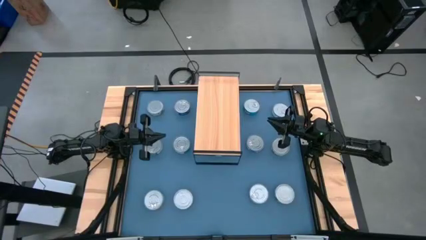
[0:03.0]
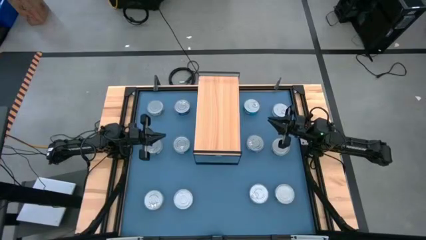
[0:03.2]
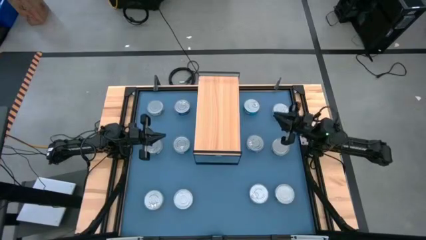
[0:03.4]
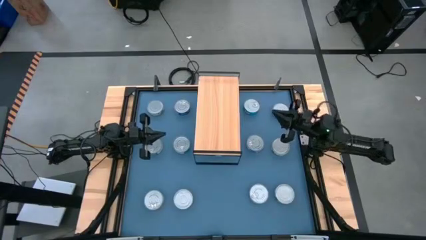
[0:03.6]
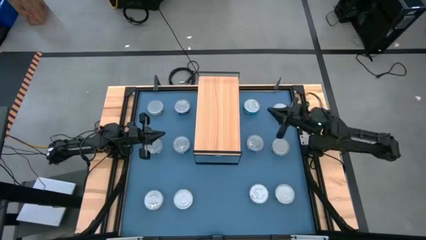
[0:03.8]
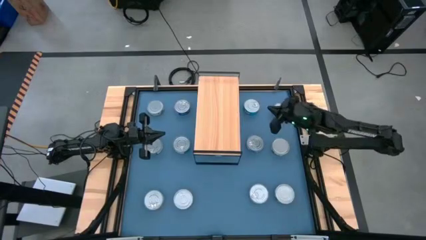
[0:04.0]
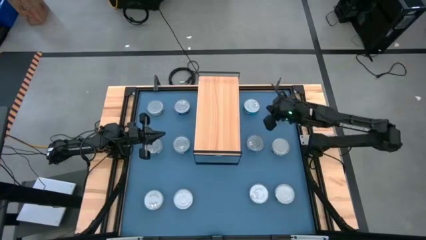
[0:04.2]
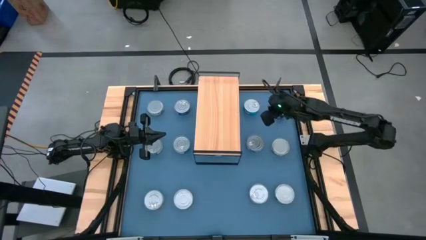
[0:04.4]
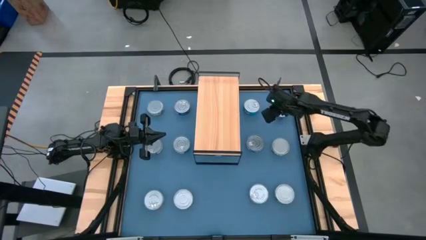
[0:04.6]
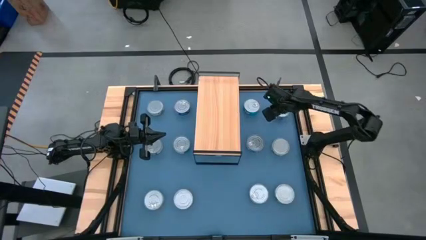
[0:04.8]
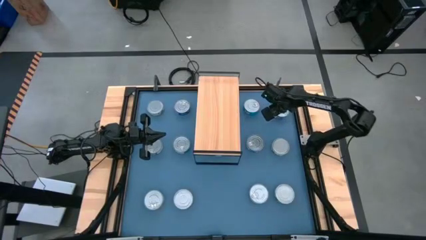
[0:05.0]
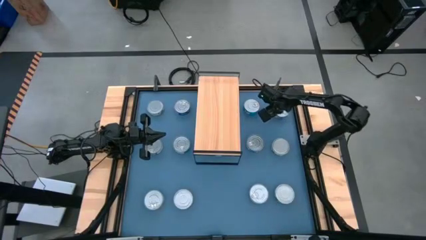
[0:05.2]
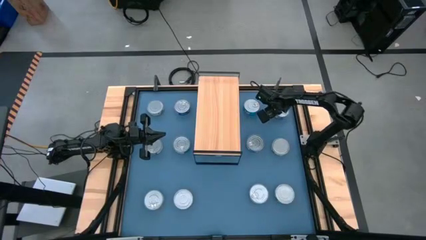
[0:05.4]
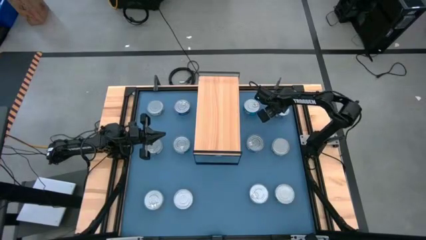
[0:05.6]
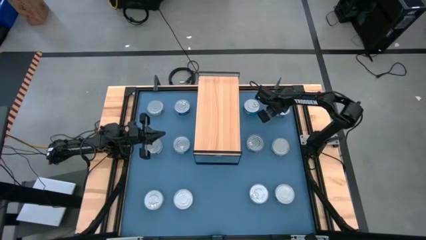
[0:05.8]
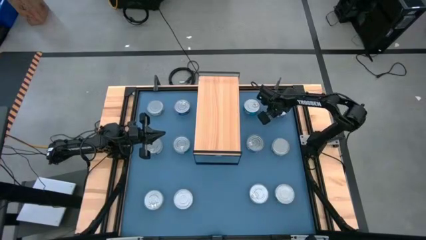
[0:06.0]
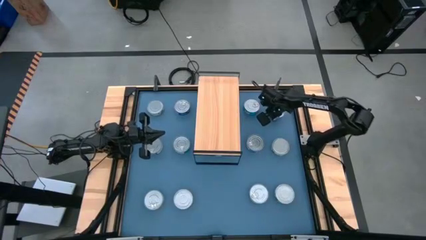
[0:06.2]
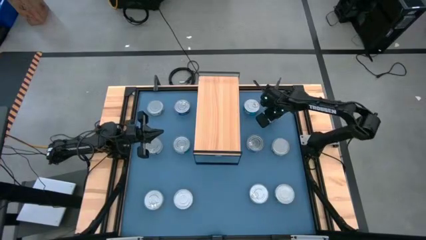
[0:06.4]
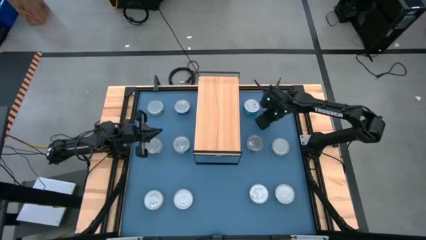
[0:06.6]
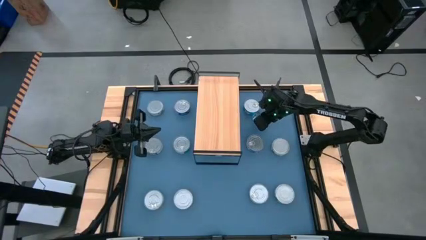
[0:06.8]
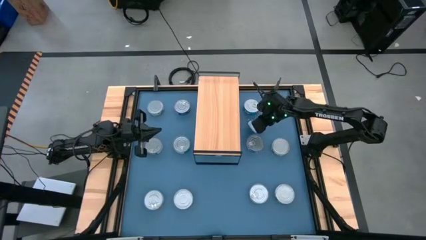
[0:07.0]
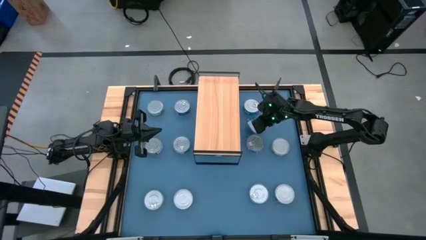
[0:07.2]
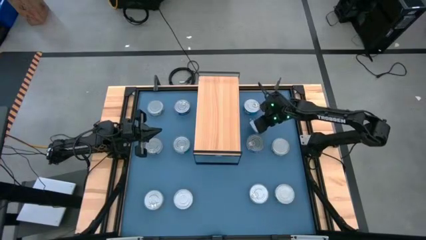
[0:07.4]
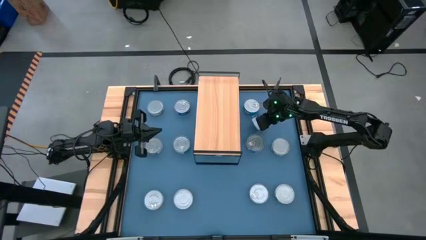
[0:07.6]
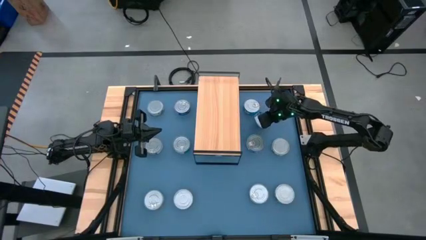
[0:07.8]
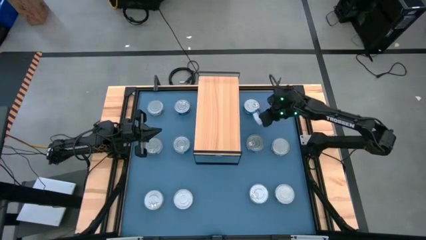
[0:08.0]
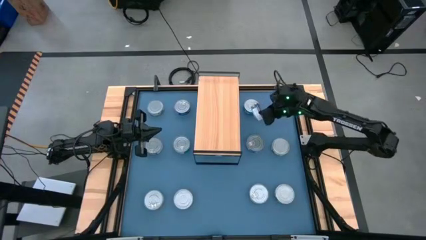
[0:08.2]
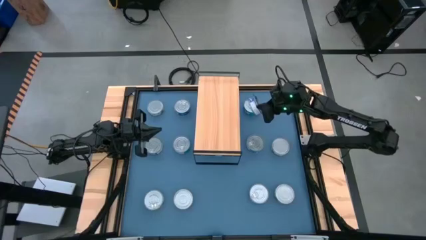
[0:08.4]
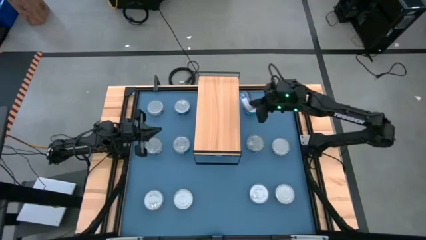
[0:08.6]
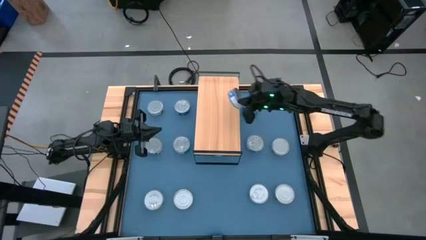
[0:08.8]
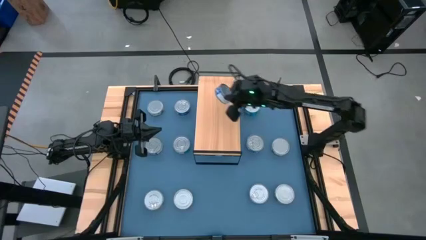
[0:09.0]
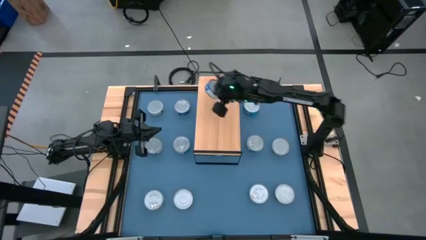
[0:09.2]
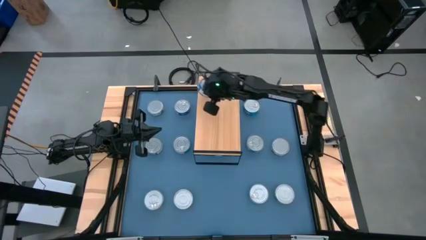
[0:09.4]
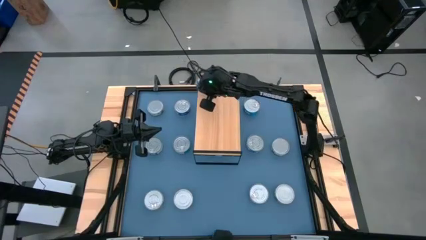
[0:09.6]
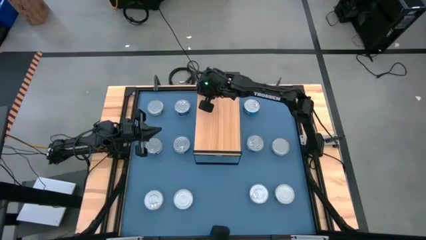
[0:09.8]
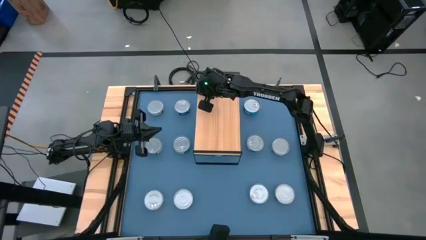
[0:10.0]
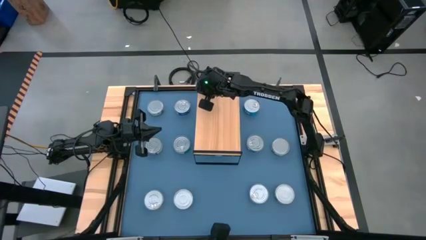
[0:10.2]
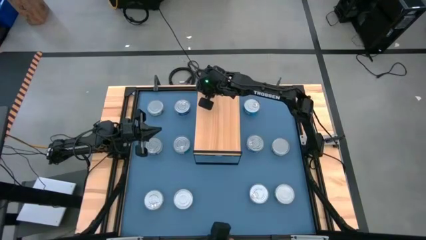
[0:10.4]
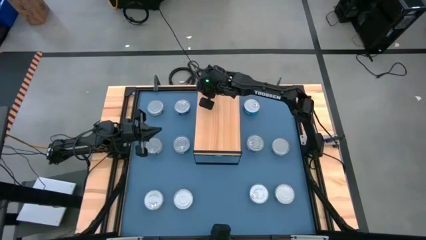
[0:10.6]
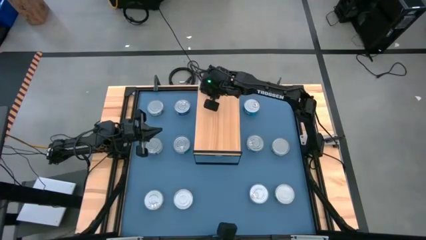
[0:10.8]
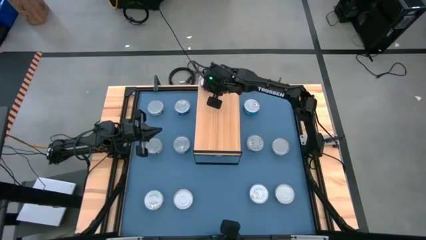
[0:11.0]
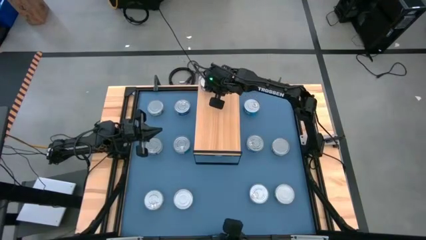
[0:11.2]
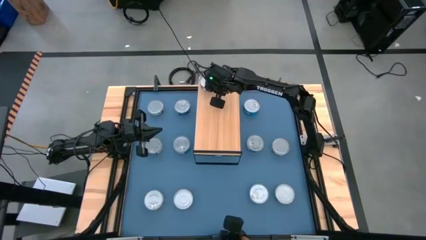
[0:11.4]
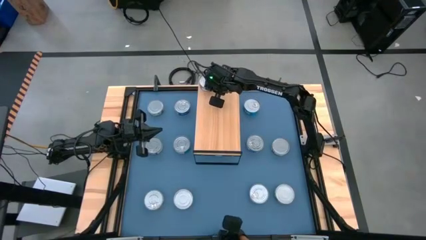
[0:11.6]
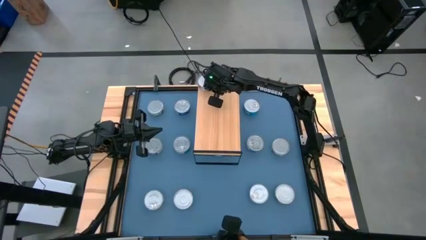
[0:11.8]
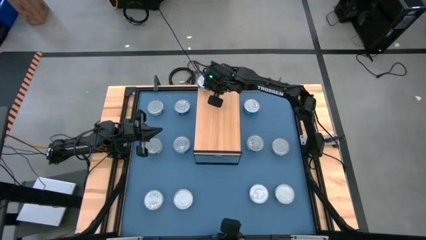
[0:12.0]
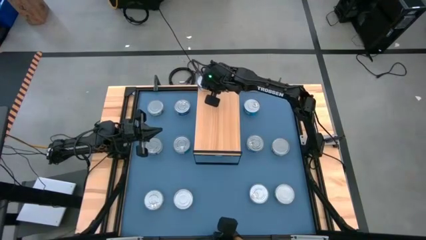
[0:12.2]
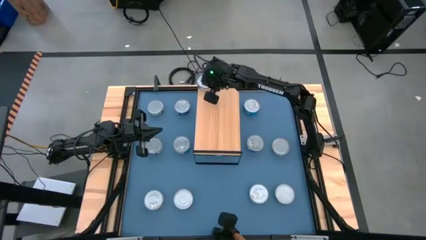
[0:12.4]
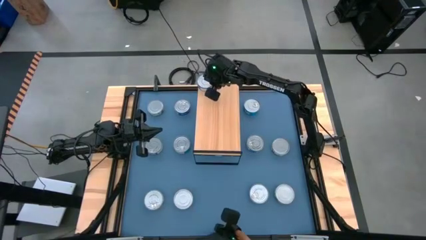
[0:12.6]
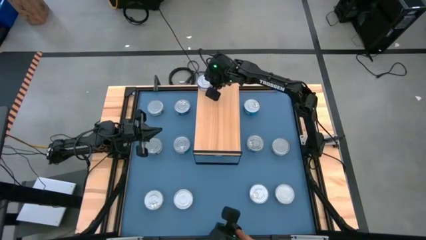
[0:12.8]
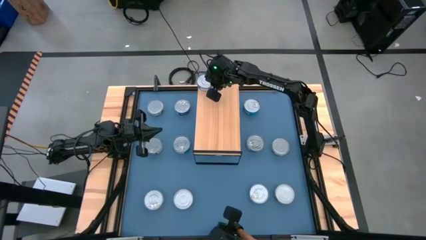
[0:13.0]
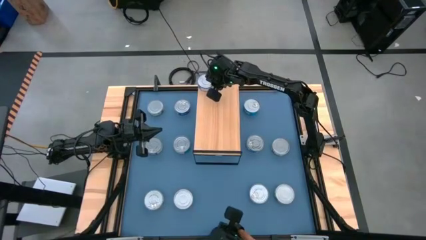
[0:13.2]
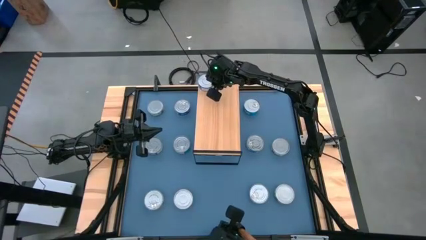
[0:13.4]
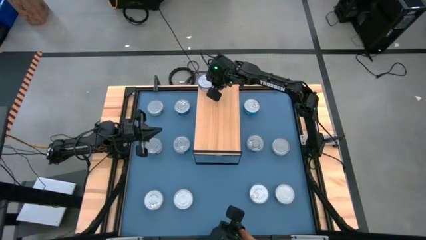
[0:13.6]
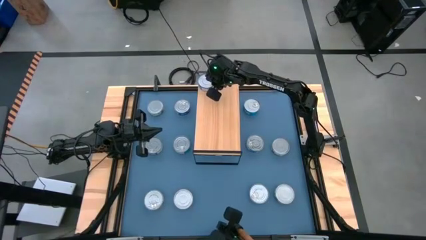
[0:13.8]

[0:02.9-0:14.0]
Task: Stack canned seafood by type on shelf
Put the blue tuna can on the shelf
